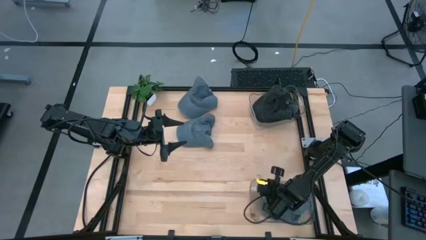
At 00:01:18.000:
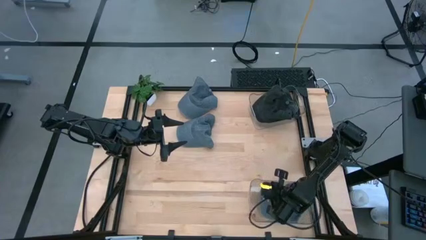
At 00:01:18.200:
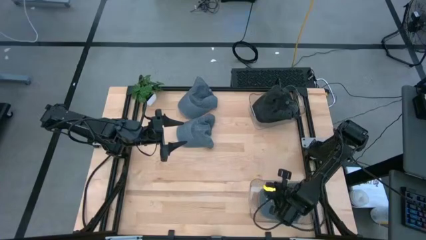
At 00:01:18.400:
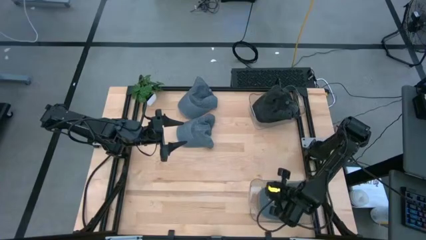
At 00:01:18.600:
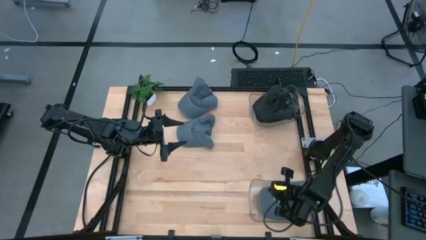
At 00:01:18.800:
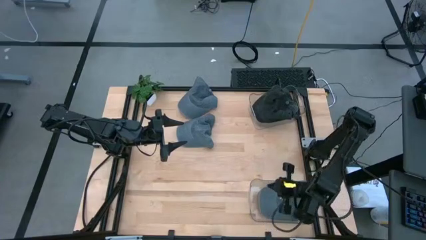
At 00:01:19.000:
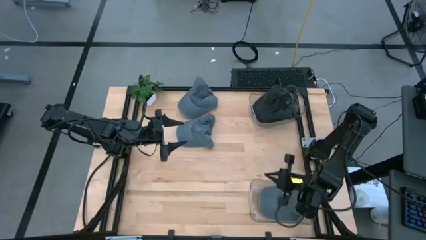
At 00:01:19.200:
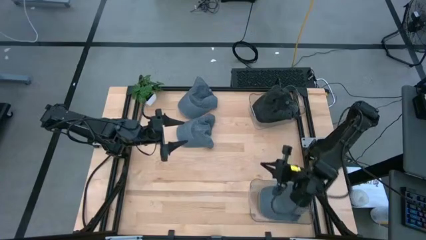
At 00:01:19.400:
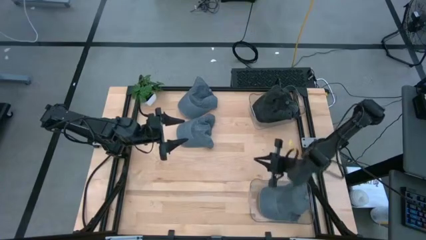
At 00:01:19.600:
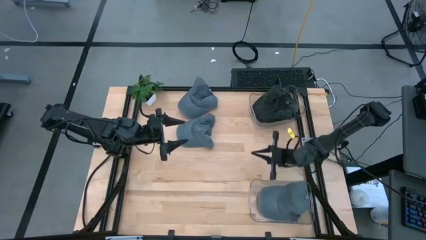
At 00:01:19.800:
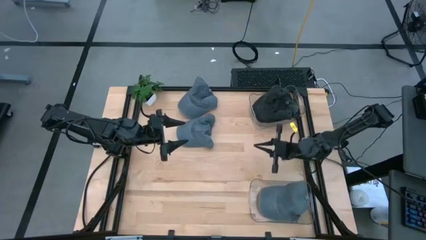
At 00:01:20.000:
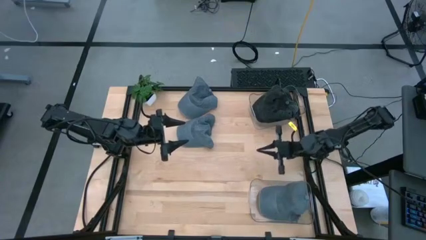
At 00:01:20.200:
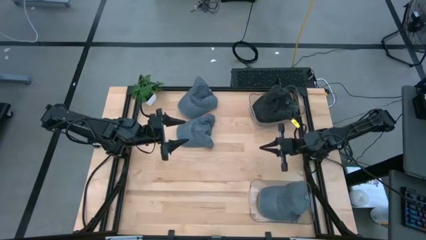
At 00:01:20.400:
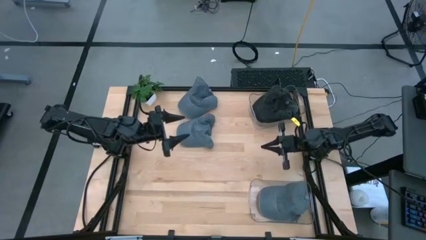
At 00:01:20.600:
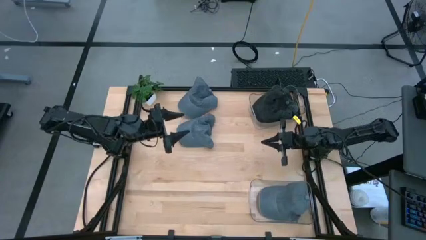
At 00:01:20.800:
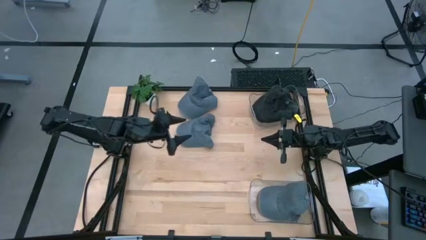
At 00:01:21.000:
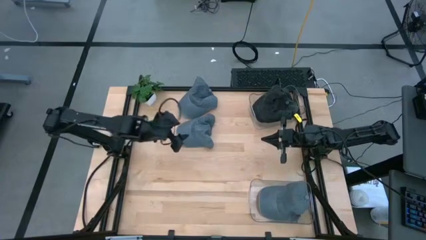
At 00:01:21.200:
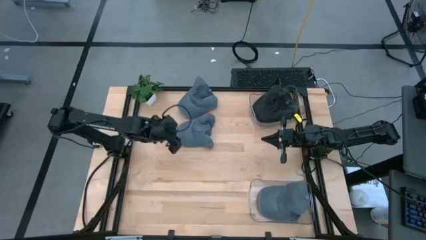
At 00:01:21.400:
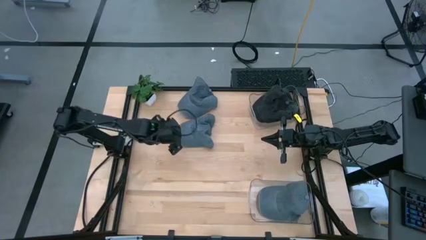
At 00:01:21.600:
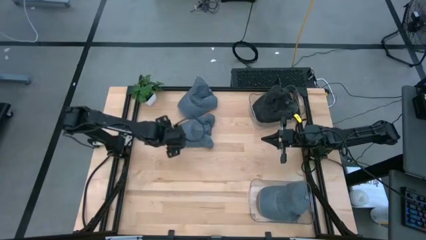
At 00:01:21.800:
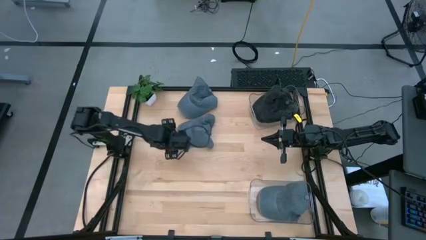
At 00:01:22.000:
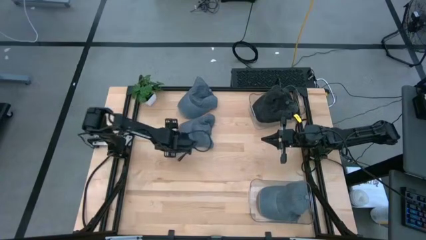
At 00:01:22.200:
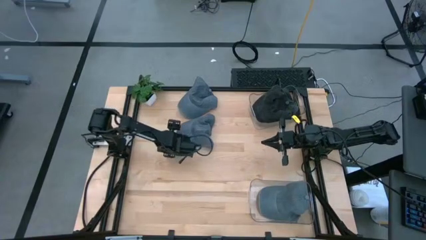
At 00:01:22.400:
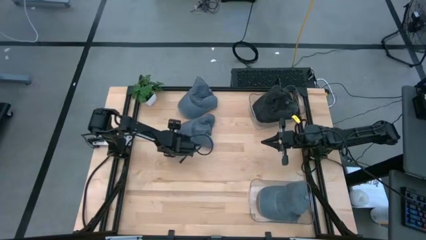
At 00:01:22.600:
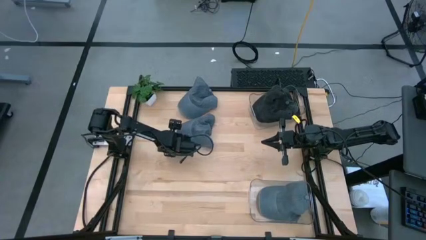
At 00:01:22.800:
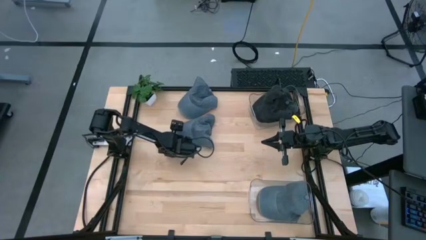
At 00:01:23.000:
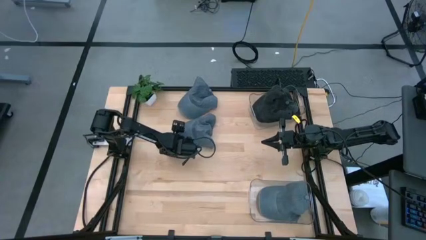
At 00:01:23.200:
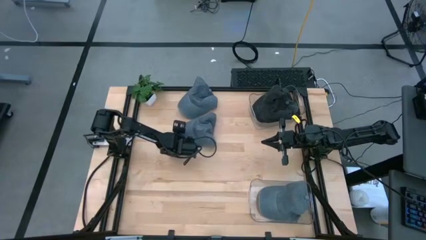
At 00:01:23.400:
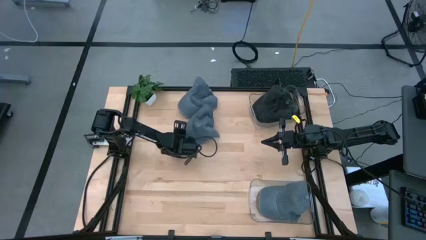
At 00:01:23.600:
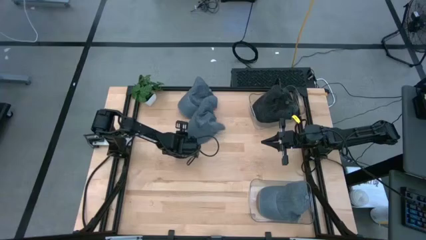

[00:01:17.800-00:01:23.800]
Task: Pick & Place hat
Put the bottom gray cap into the bottom transparent bin

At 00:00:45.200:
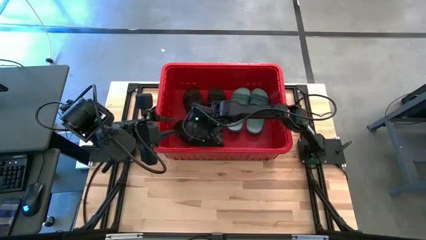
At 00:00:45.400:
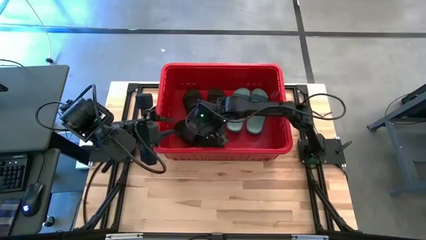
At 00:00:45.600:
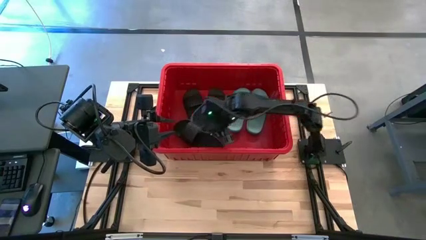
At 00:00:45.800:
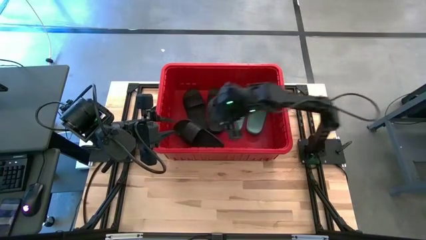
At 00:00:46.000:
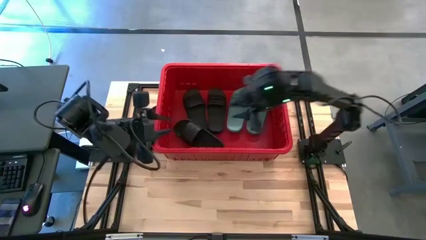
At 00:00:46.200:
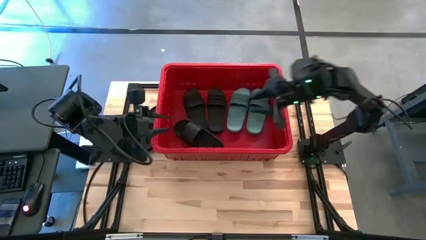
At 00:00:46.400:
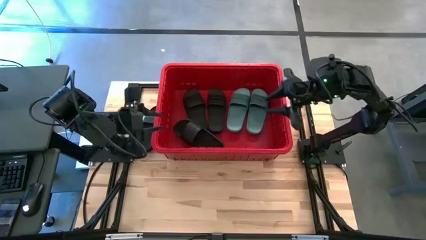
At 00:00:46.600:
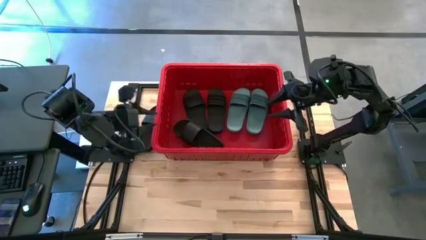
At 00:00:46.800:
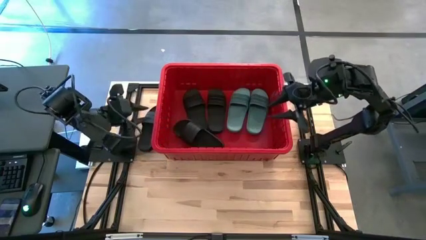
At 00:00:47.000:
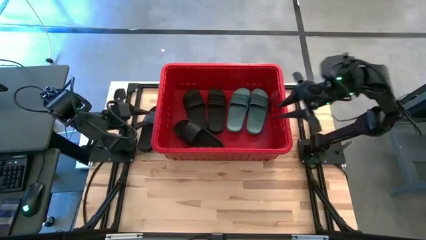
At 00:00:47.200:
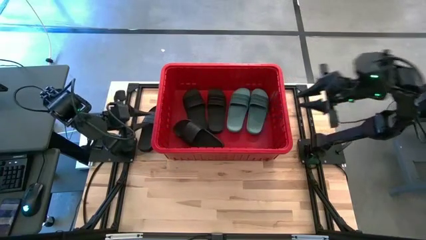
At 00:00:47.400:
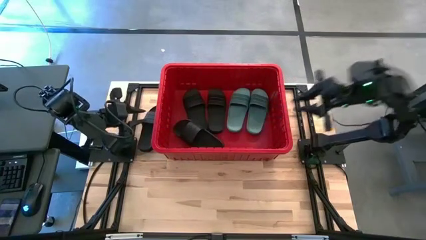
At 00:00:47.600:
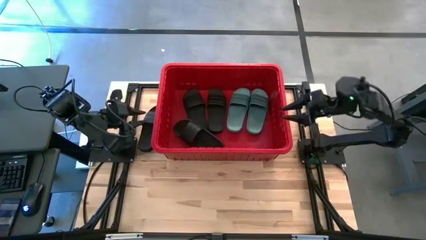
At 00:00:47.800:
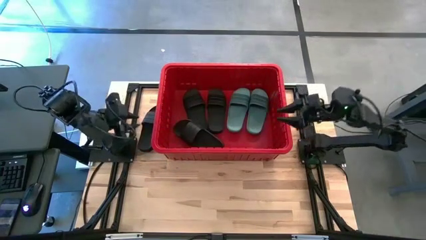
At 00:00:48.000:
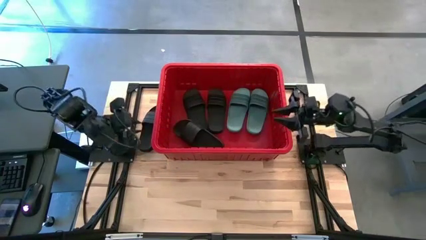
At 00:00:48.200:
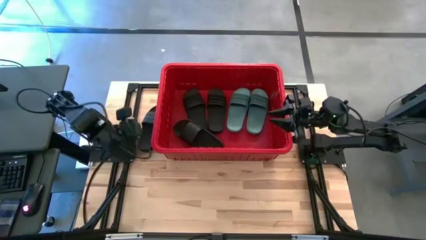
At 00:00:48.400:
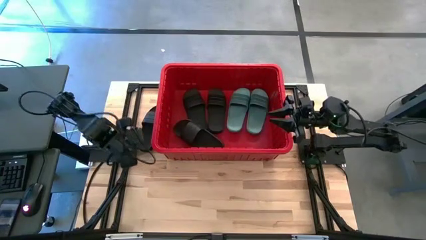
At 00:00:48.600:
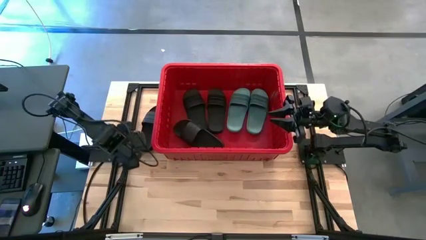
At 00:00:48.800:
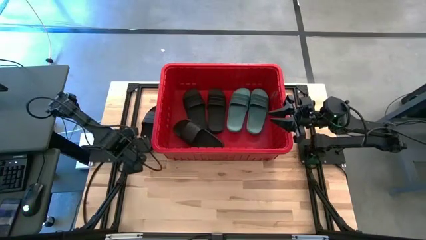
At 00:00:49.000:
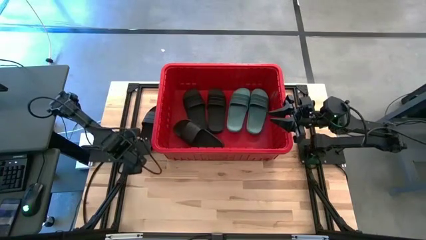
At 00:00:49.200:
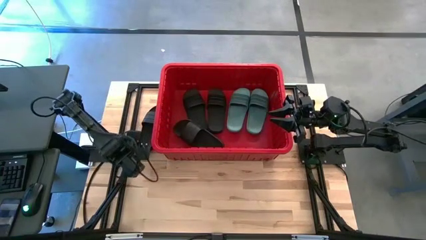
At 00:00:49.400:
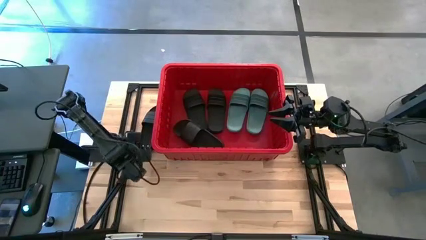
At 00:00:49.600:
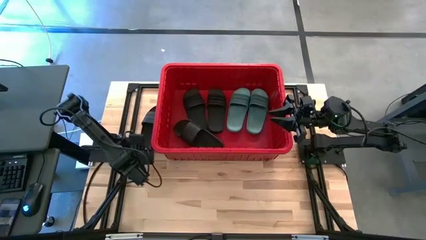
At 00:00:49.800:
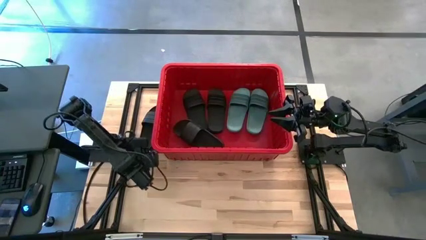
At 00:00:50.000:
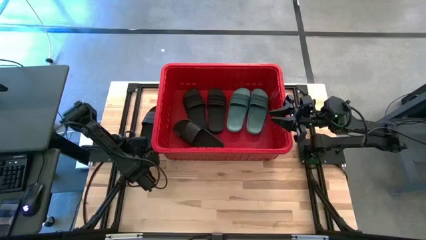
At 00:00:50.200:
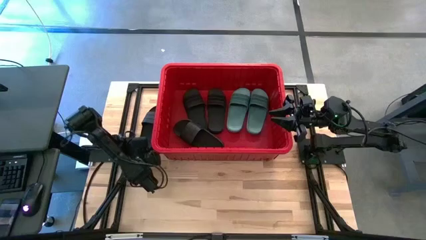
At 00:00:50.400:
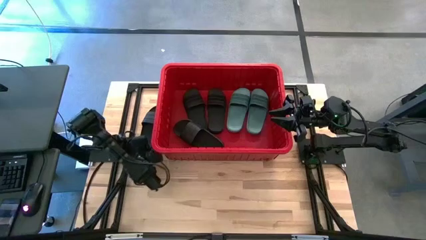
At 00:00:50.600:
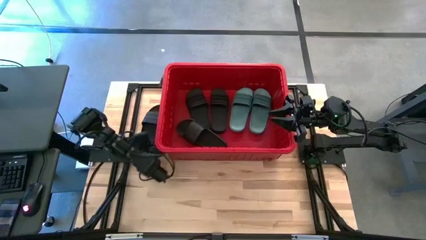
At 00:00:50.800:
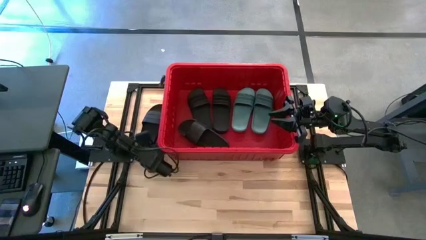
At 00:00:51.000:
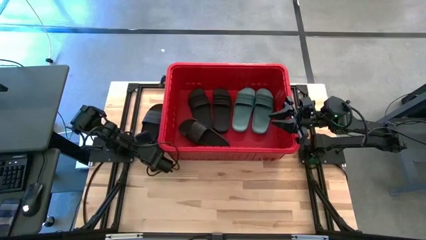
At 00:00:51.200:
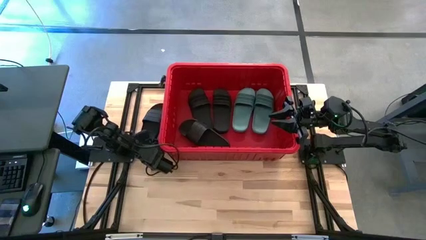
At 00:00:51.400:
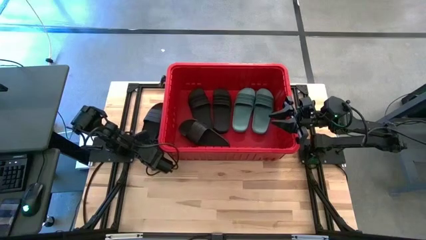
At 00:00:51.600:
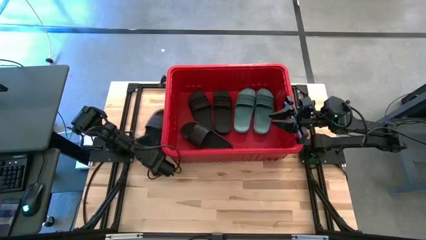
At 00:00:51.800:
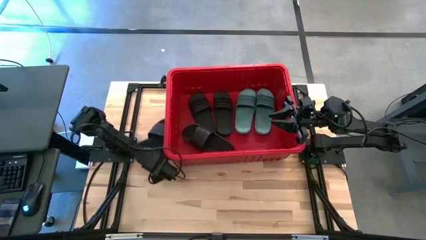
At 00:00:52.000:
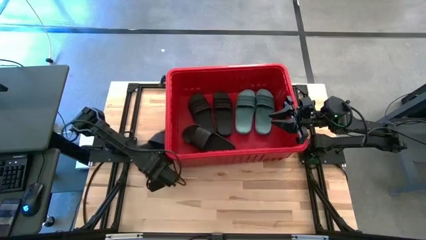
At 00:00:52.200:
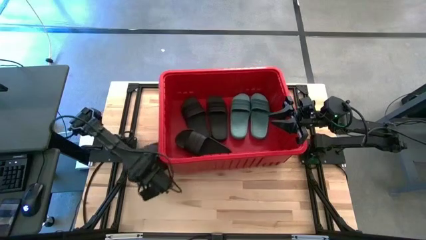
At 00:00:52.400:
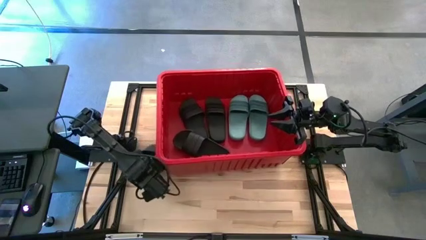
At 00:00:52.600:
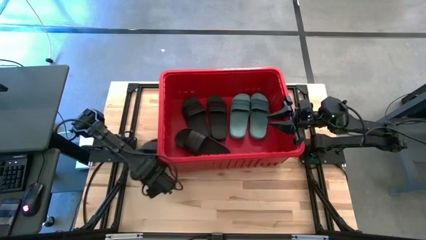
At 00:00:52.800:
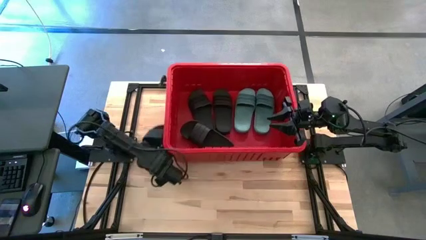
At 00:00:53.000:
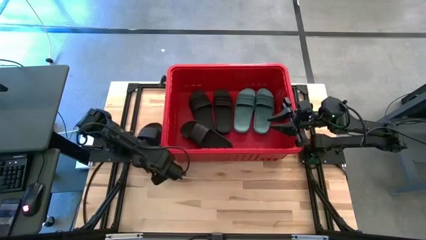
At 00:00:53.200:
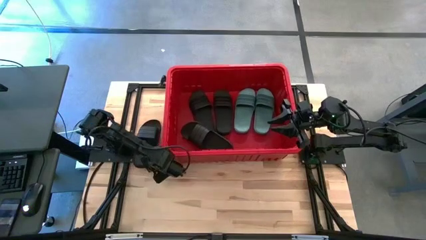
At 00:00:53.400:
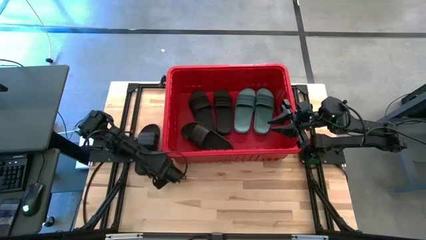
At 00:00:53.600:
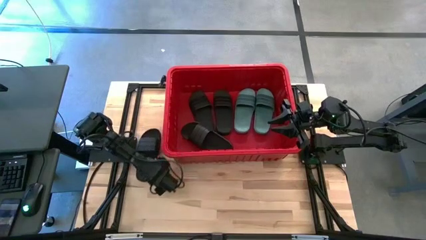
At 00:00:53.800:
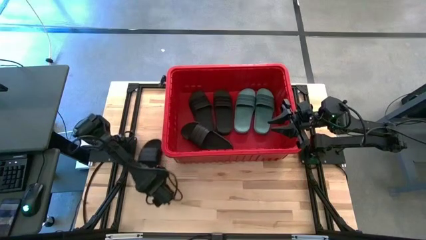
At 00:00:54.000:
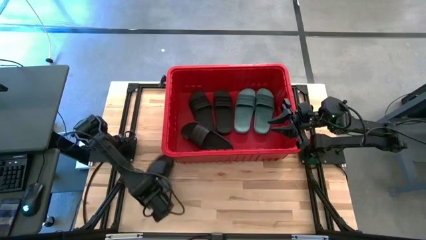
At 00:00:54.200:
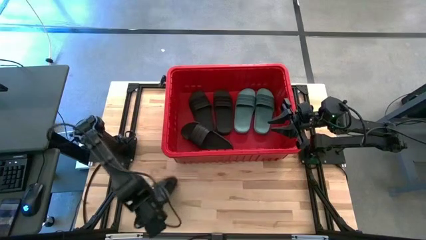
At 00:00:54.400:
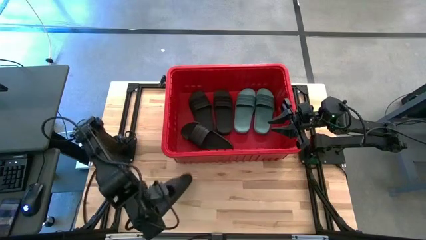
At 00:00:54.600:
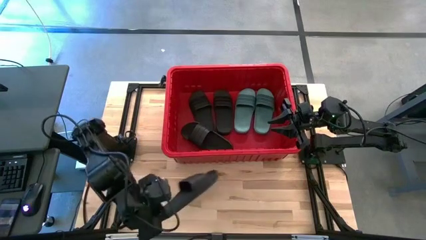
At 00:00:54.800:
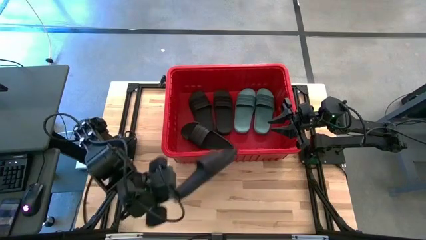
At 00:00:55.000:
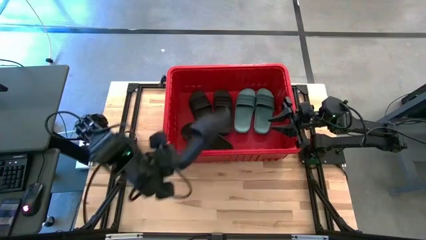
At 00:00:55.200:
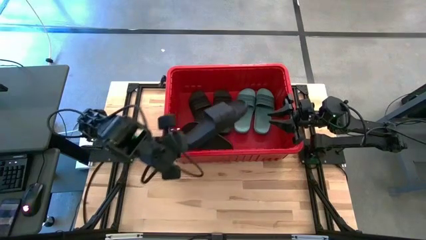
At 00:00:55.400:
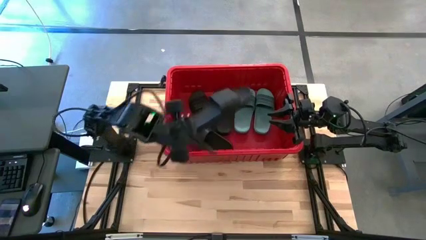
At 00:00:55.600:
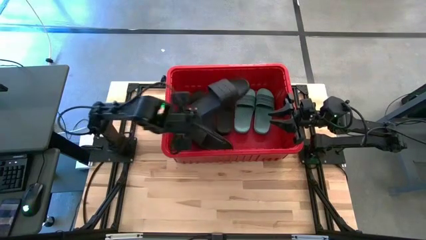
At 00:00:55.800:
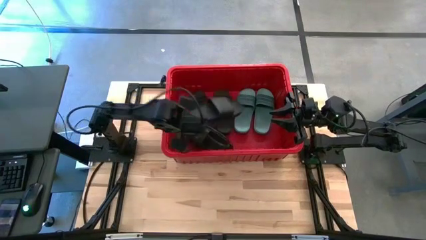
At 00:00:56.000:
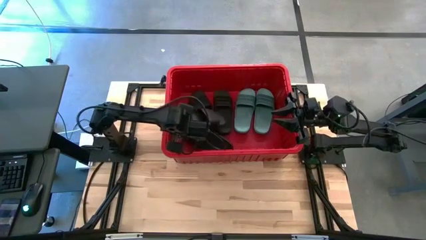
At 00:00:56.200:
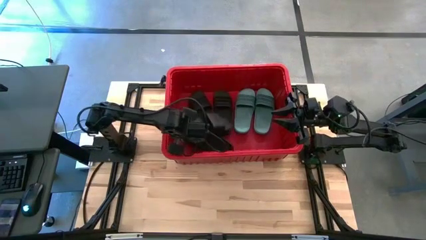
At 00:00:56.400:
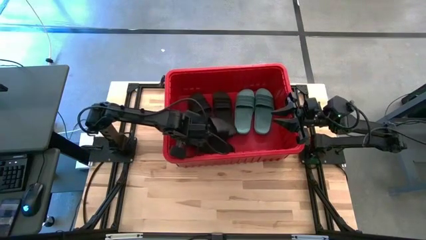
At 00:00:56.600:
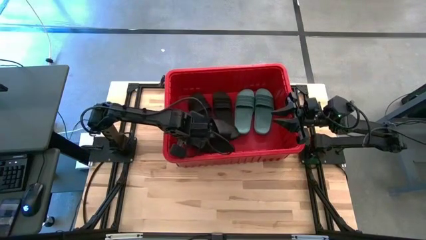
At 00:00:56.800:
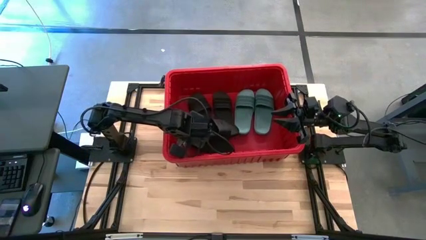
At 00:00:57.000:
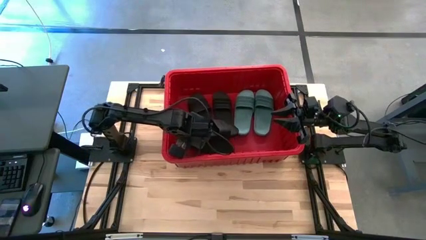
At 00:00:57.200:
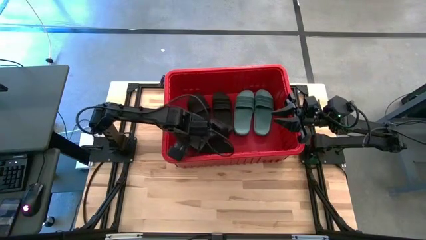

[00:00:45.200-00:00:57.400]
Task: Pick and place slides into bin
Put the black slide into the red container
